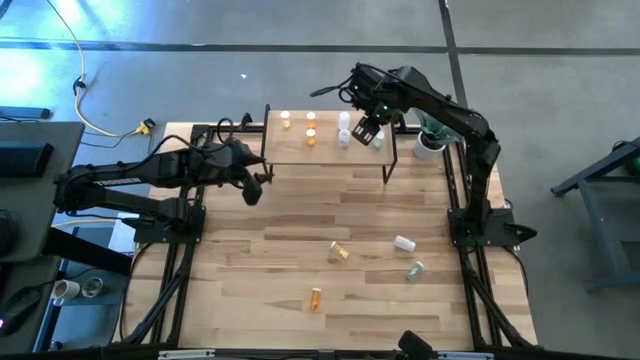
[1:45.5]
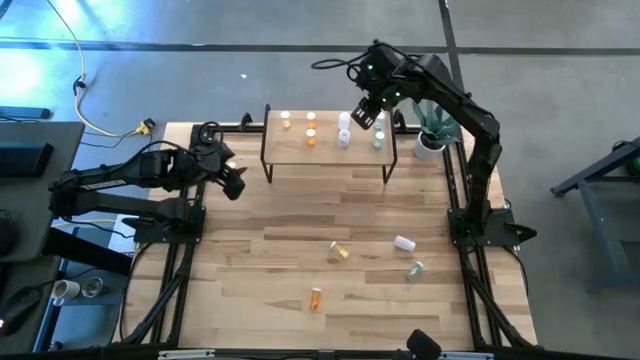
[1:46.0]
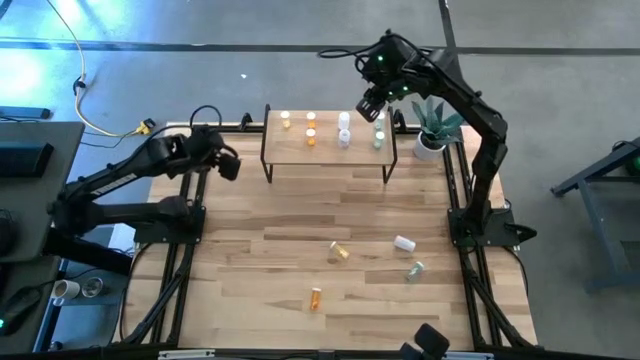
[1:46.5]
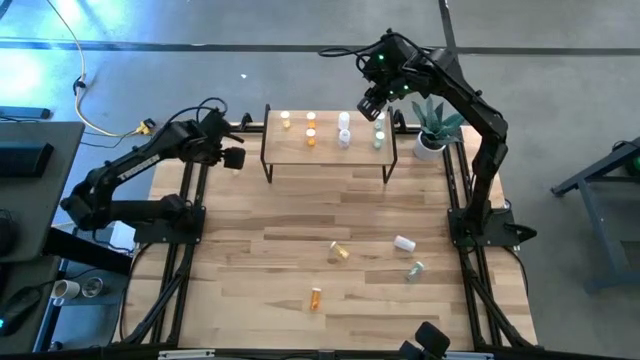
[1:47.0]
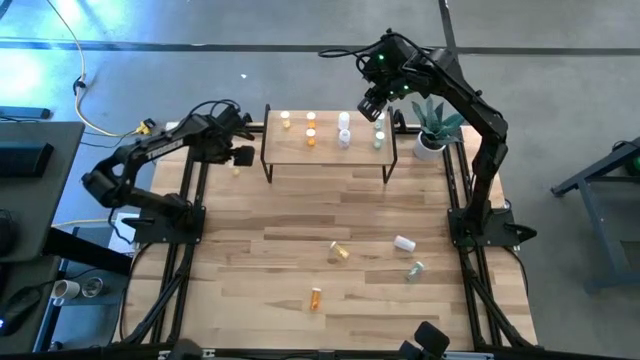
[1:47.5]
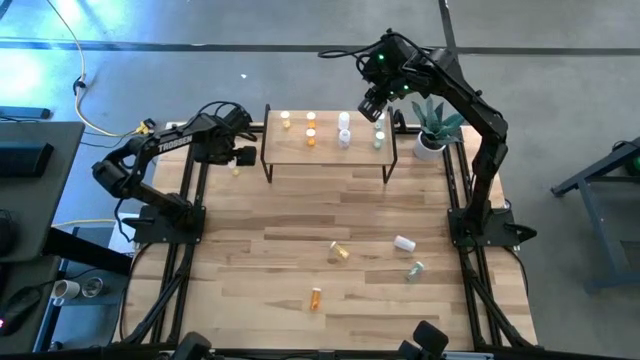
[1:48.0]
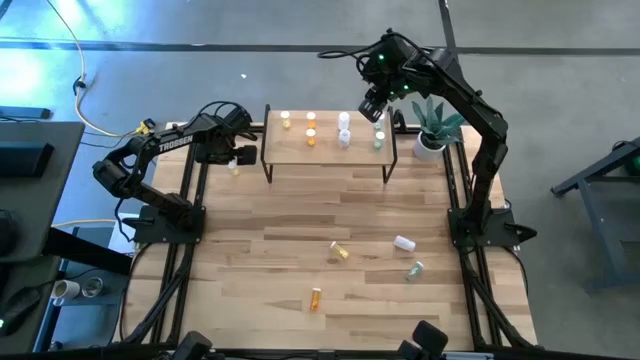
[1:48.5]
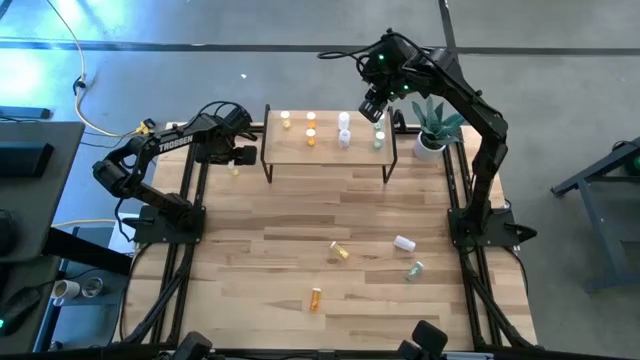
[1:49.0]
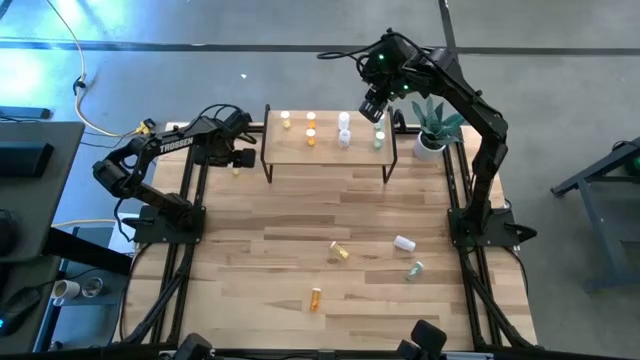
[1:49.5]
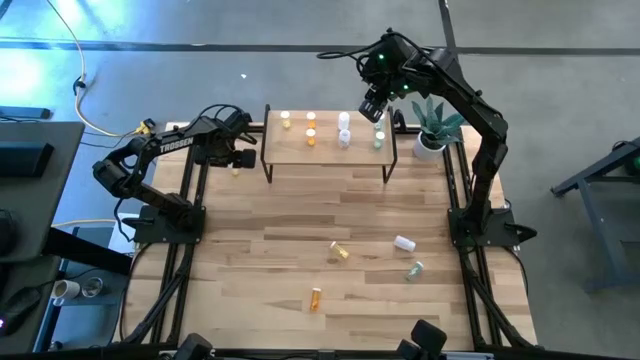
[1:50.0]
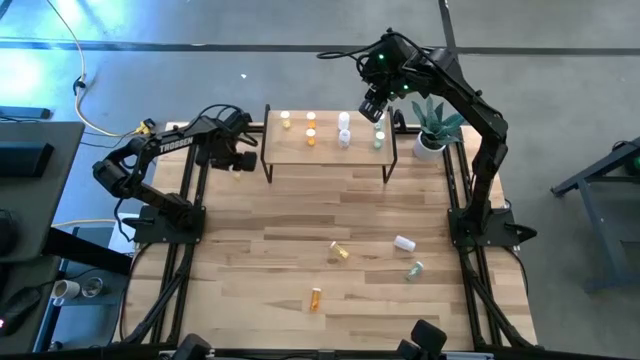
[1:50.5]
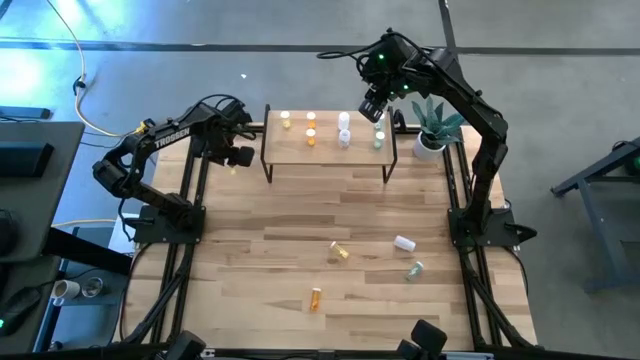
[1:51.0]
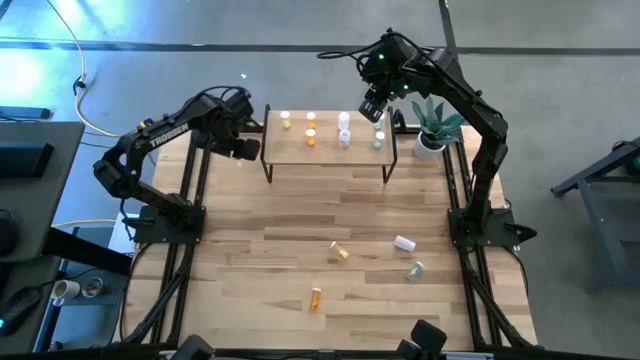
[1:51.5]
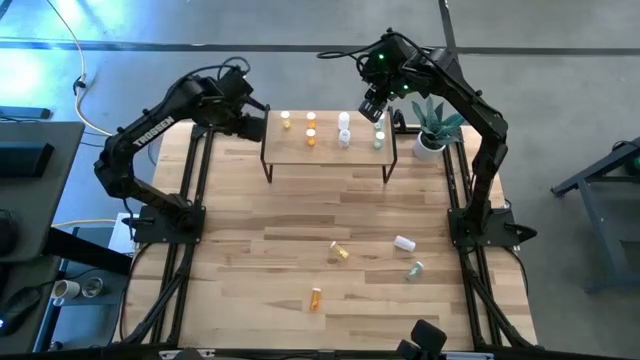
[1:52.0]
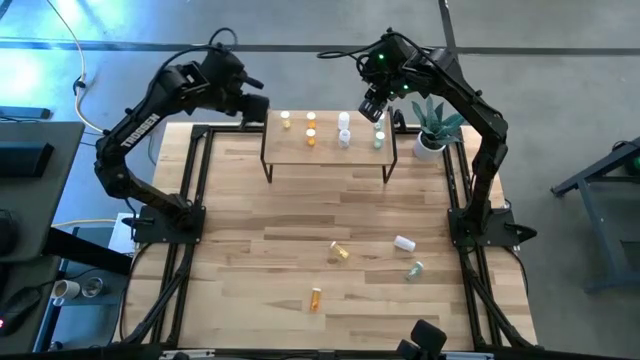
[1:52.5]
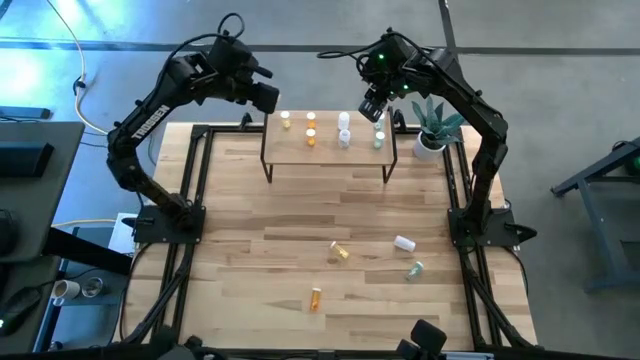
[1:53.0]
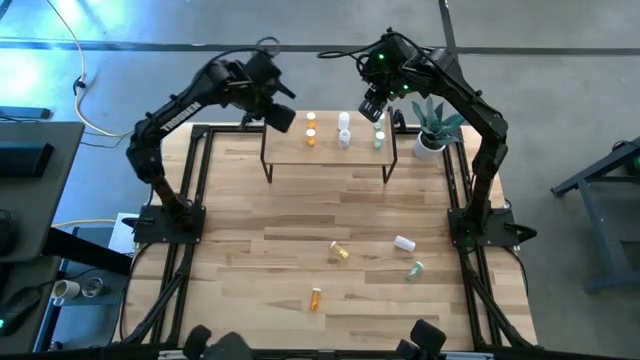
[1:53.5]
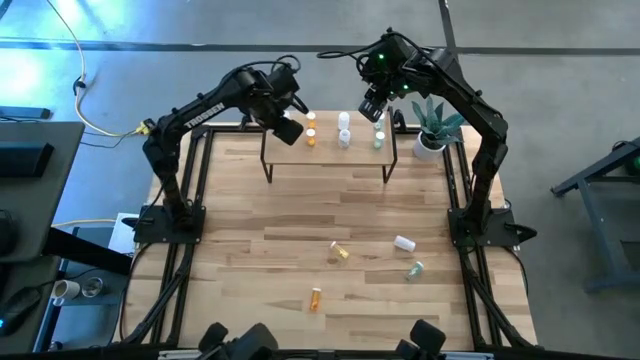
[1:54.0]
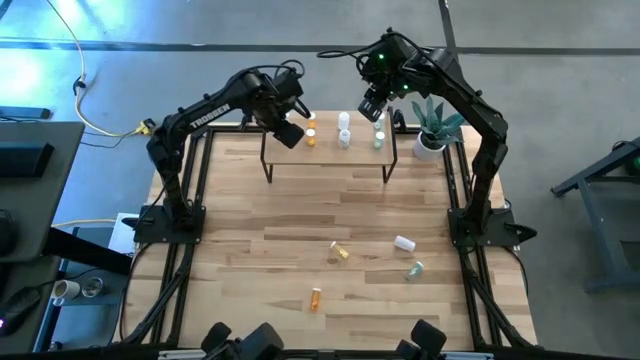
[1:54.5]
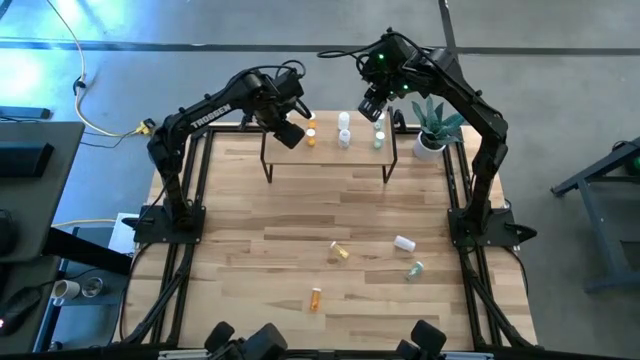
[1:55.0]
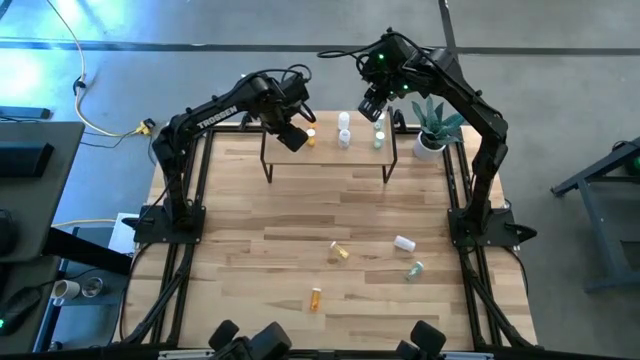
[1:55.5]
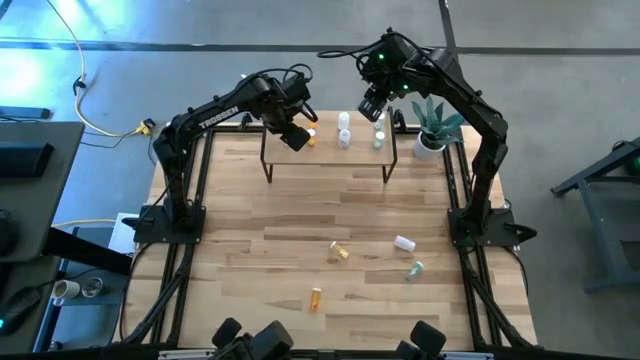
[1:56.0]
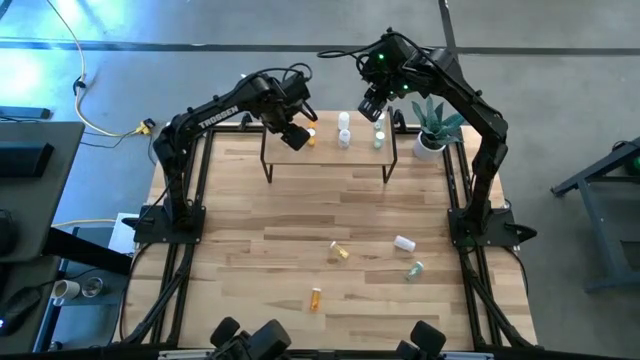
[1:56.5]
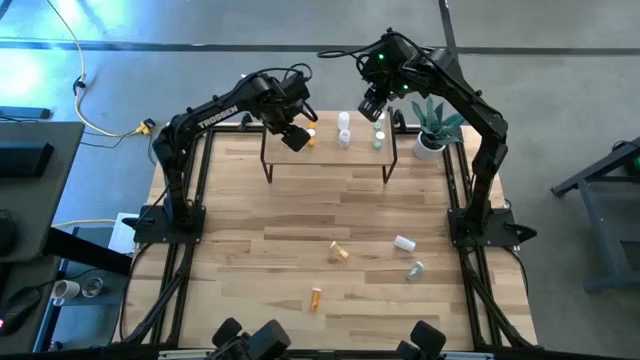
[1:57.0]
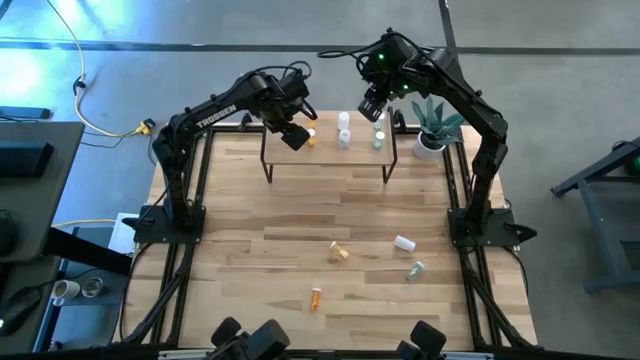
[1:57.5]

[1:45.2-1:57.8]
Task: Pick and place medicine bottles onto shelf by color
Put the top yellow pill bottle on the shelf and align it to the other yellow pill bottle

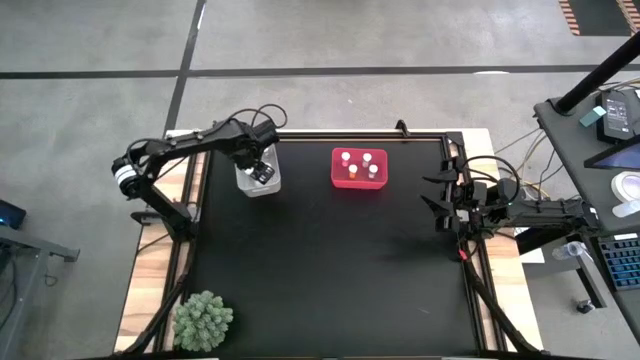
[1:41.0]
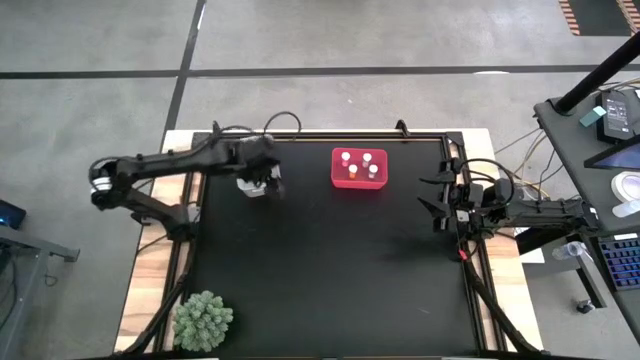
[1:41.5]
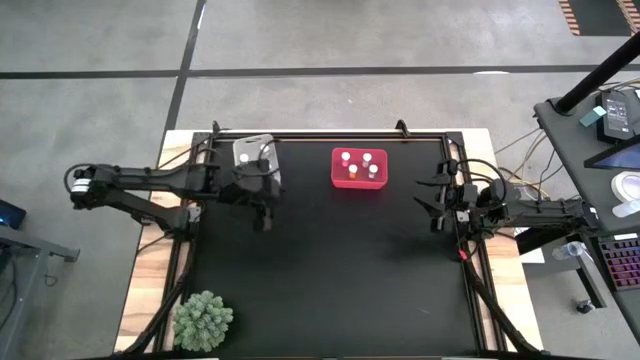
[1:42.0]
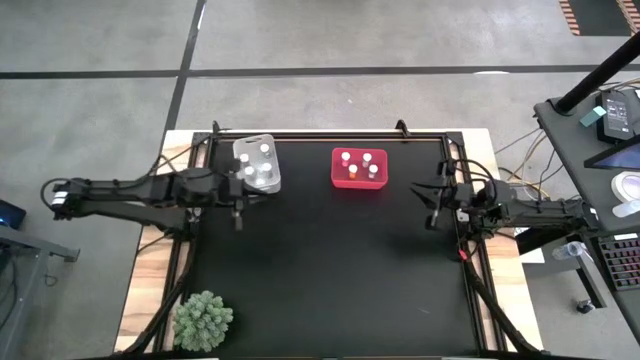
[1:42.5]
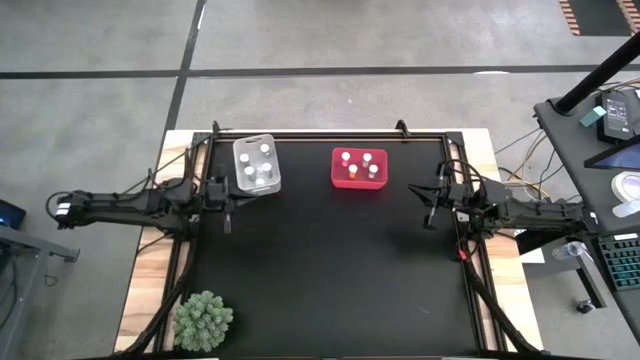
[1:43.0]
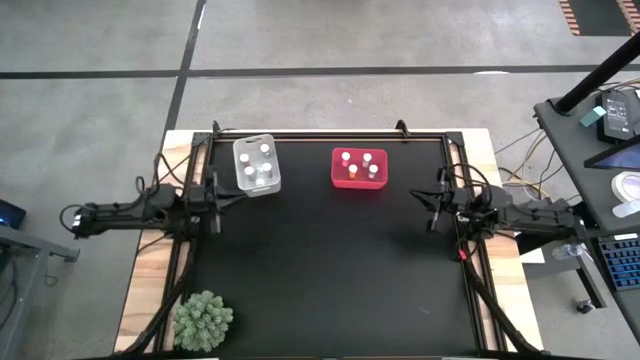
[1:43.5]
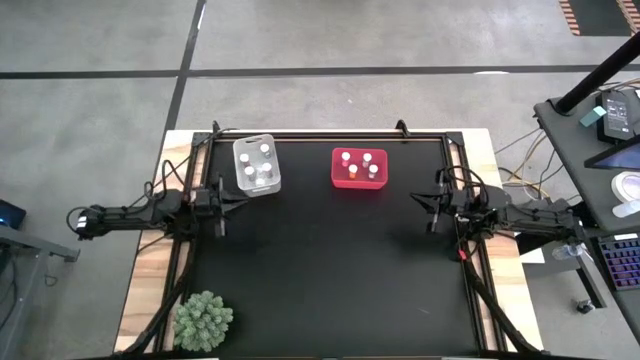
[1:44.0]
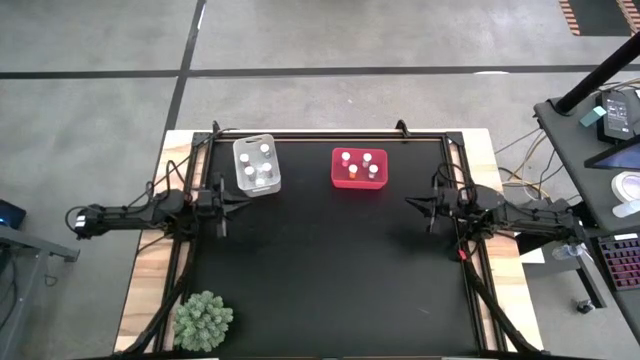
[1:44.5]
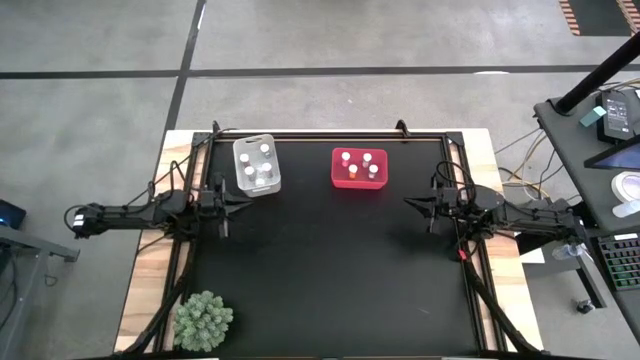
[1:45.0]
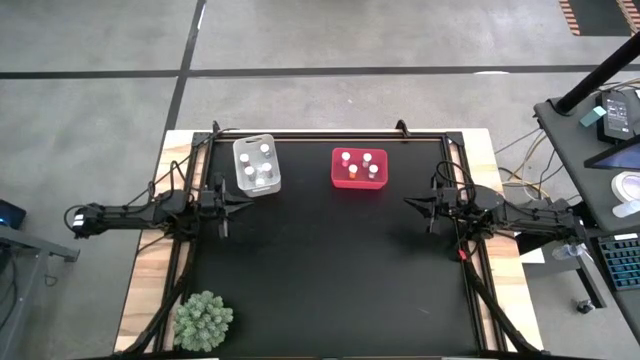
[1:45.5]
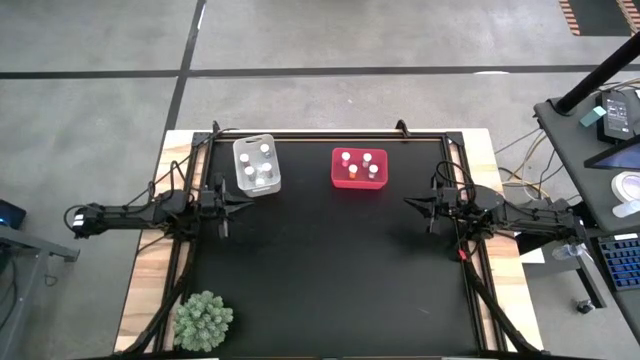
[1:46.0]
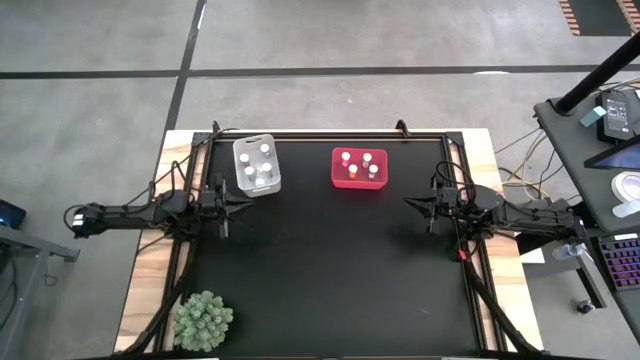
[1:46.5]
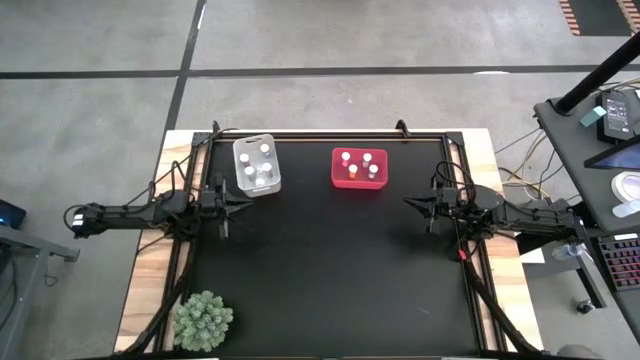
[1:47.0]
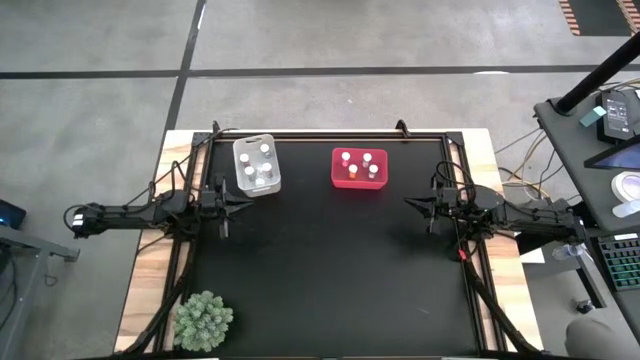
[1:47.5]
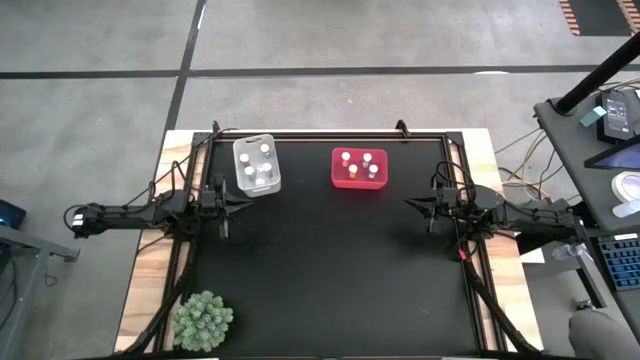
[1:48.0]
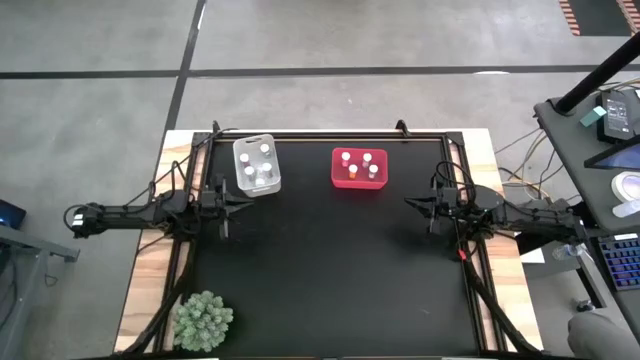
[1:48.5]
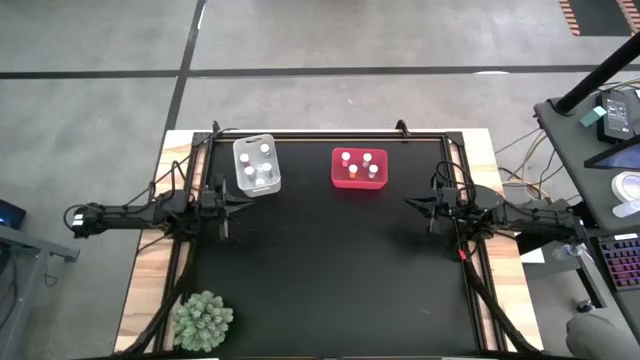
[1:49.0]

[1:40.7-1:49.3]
Task: Pick and place medicine bottles into bin by pill shape (circle, oval)
Return to Home Position
